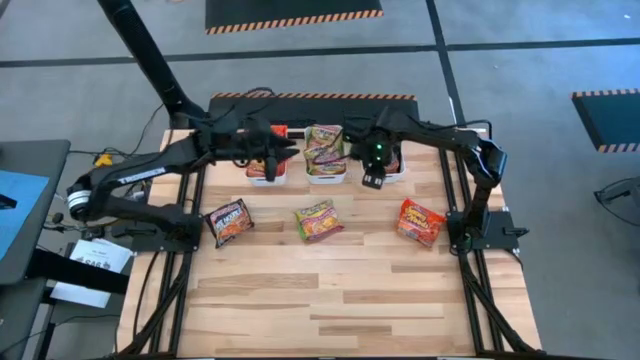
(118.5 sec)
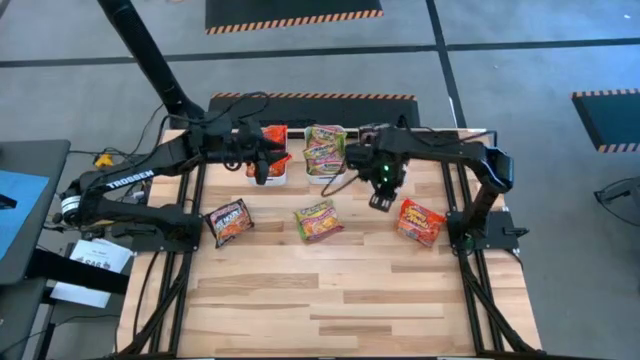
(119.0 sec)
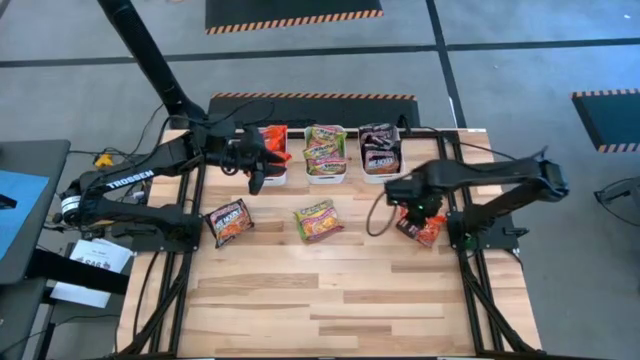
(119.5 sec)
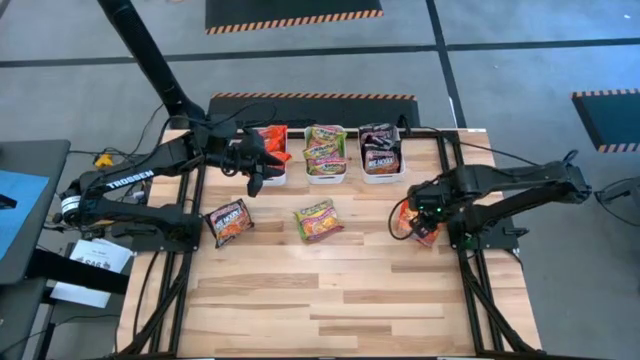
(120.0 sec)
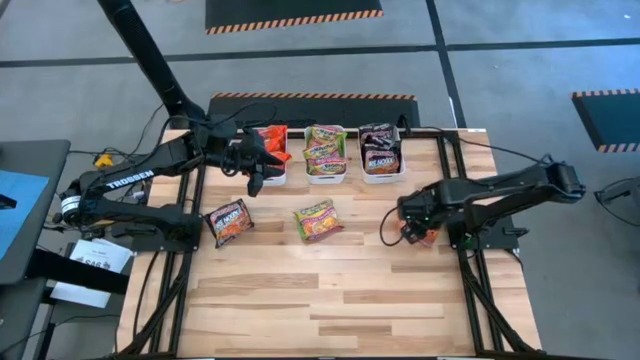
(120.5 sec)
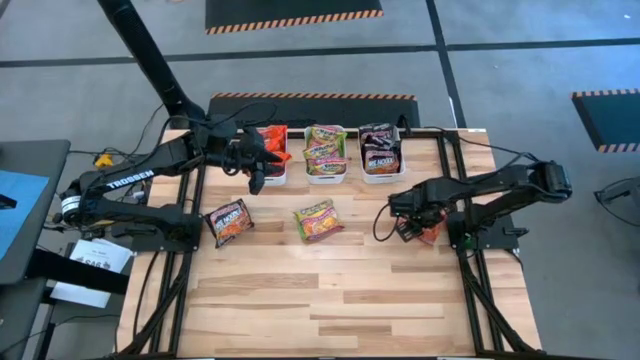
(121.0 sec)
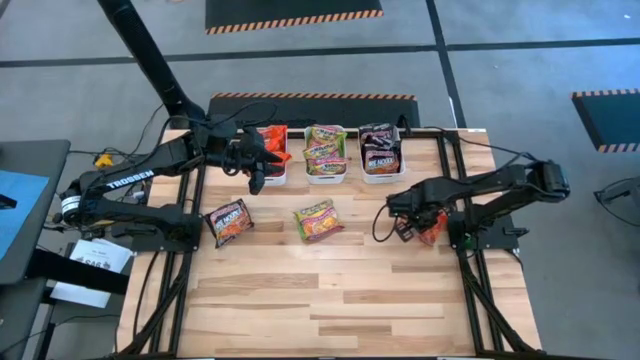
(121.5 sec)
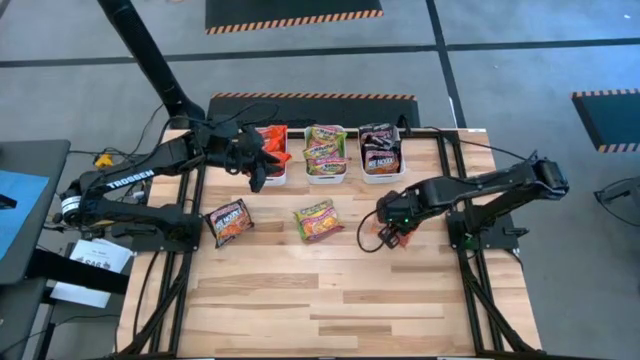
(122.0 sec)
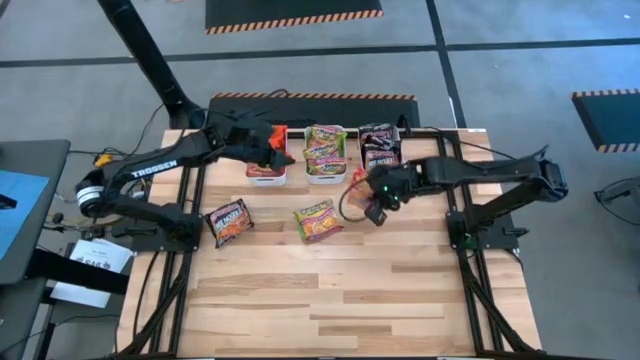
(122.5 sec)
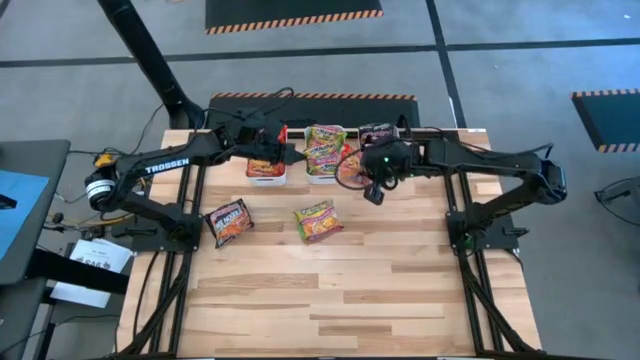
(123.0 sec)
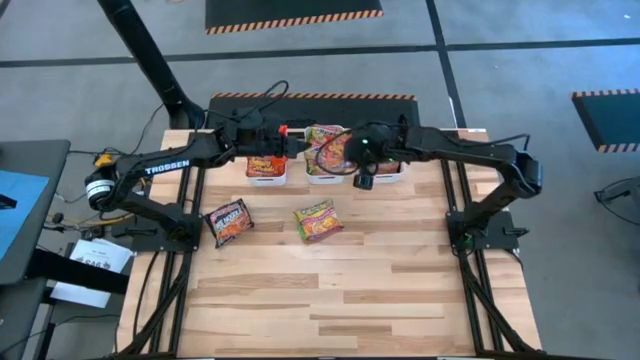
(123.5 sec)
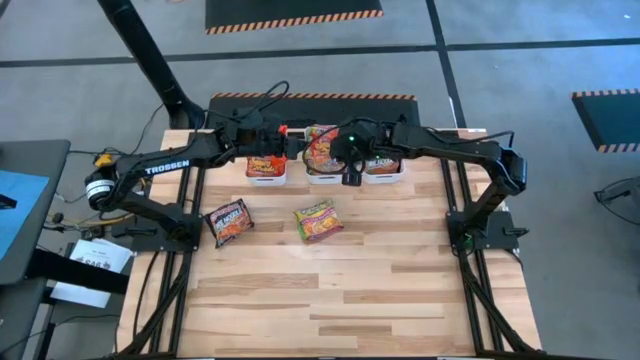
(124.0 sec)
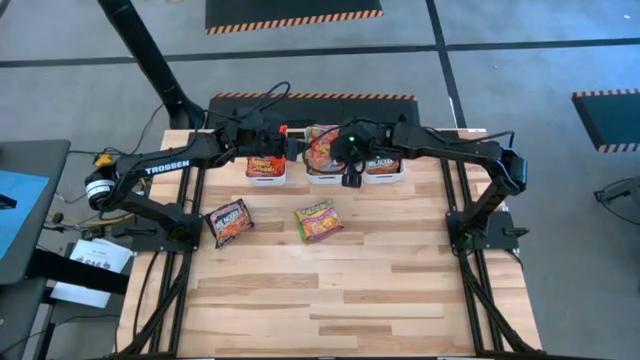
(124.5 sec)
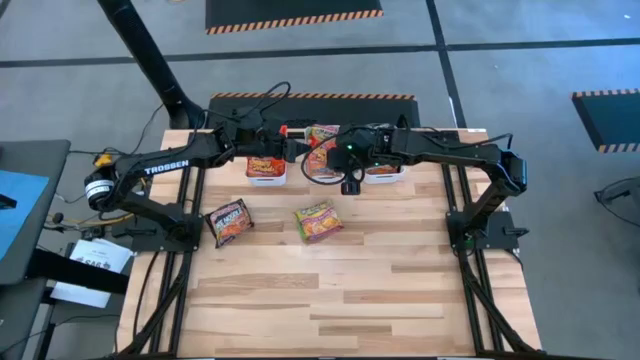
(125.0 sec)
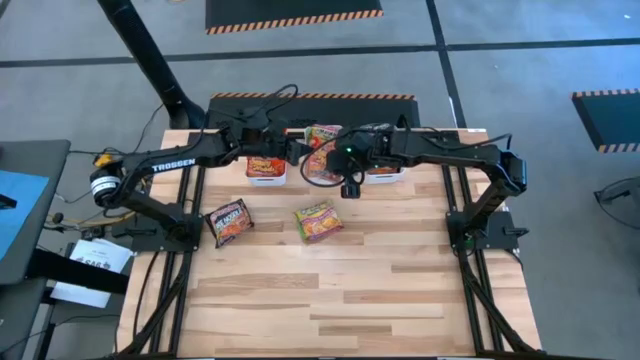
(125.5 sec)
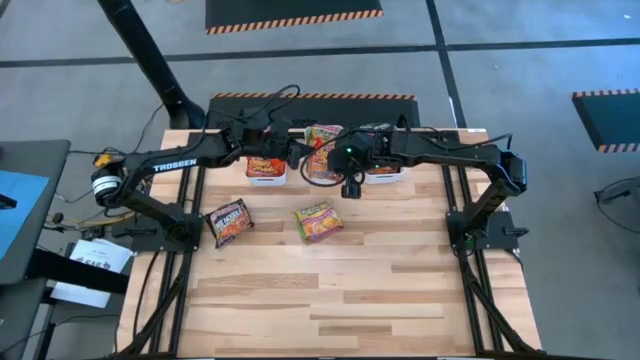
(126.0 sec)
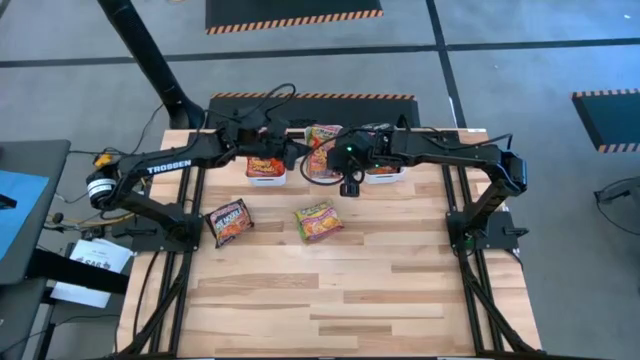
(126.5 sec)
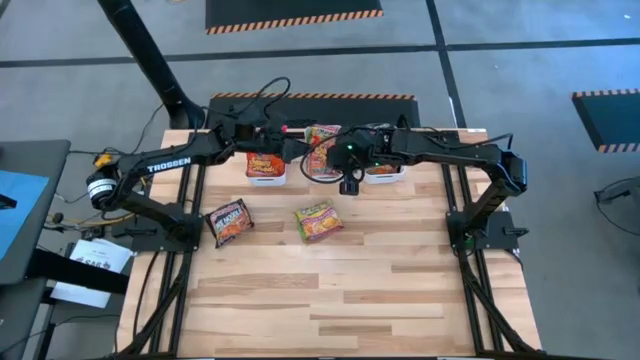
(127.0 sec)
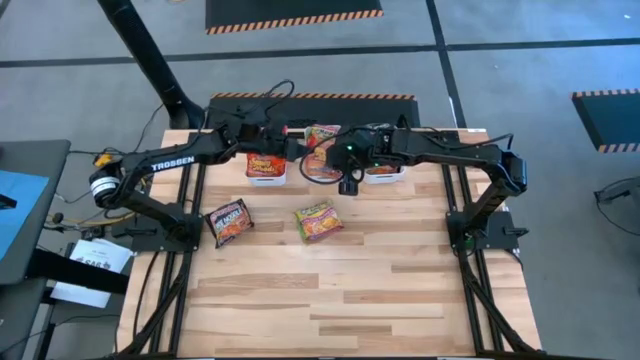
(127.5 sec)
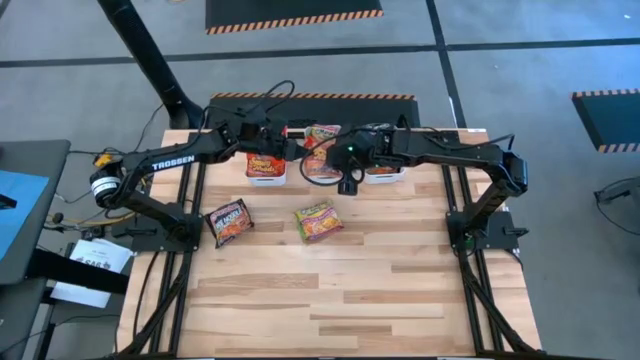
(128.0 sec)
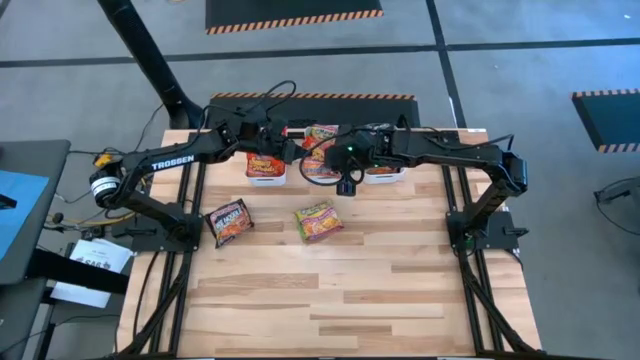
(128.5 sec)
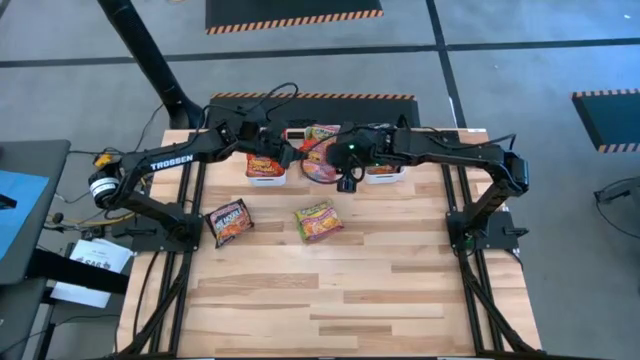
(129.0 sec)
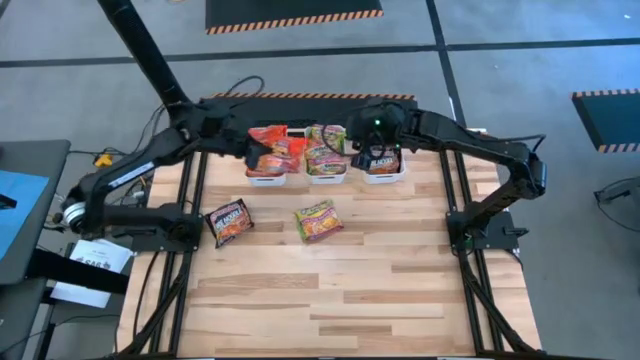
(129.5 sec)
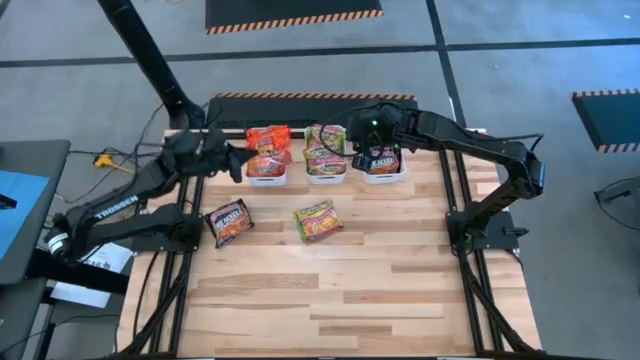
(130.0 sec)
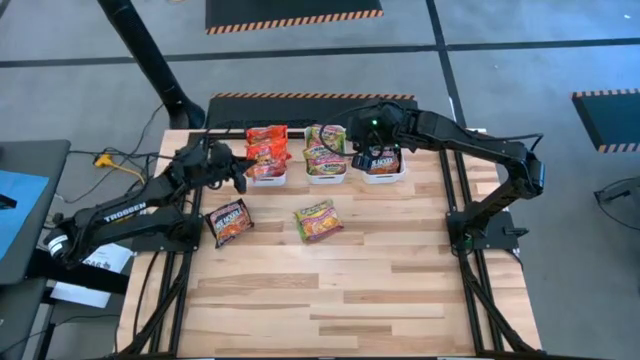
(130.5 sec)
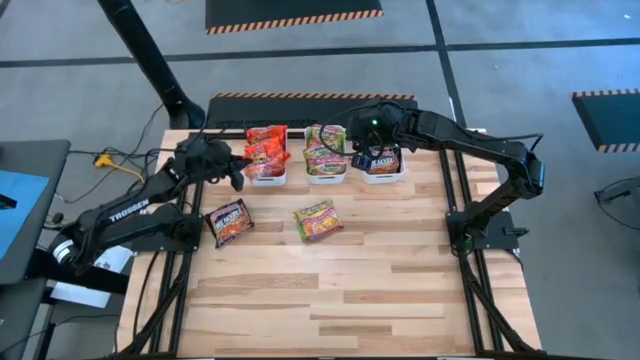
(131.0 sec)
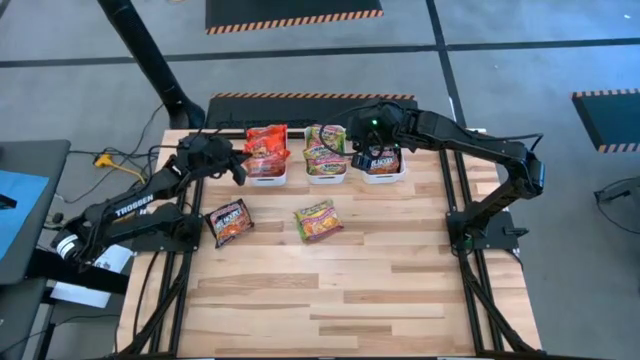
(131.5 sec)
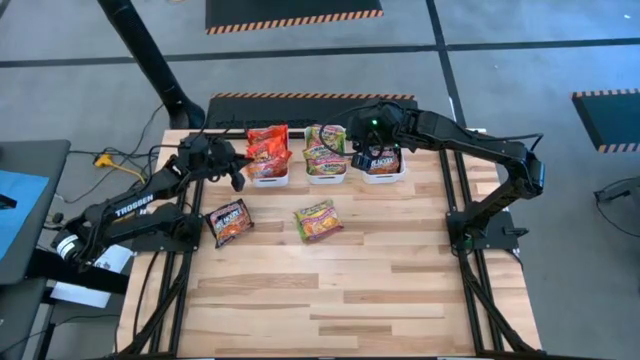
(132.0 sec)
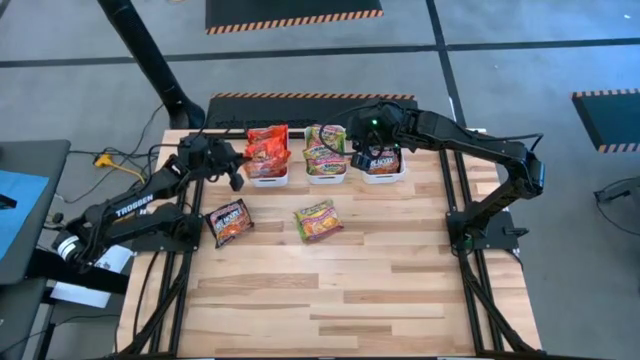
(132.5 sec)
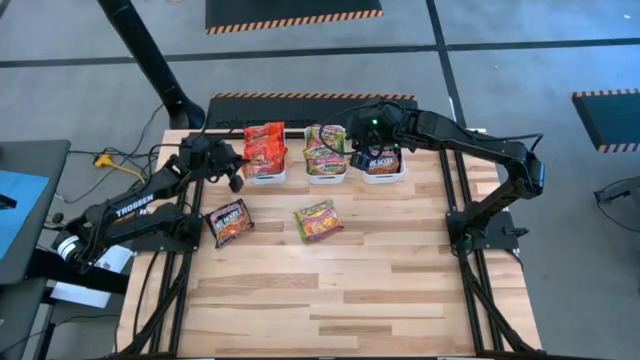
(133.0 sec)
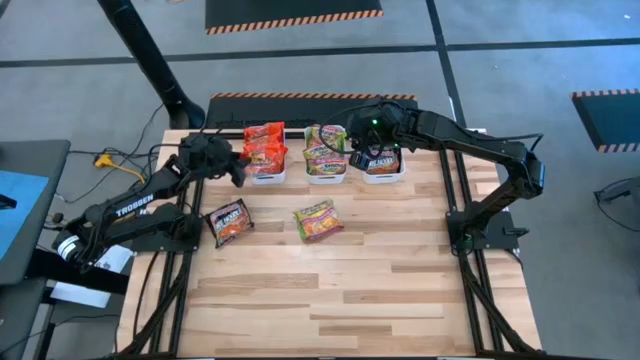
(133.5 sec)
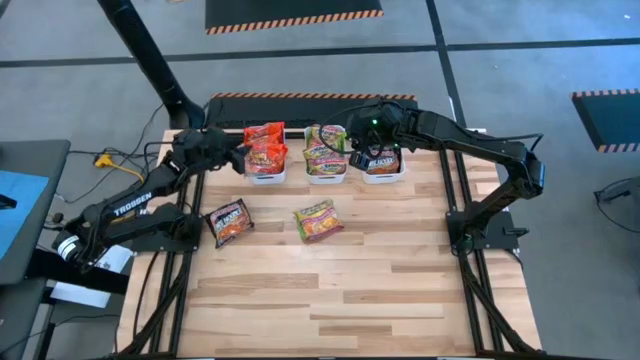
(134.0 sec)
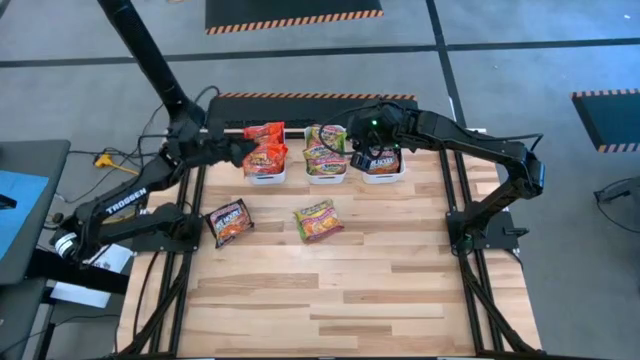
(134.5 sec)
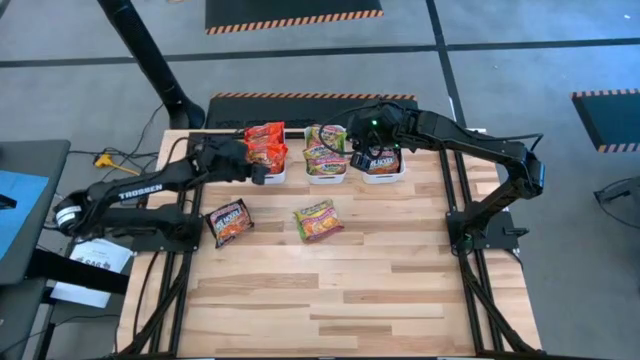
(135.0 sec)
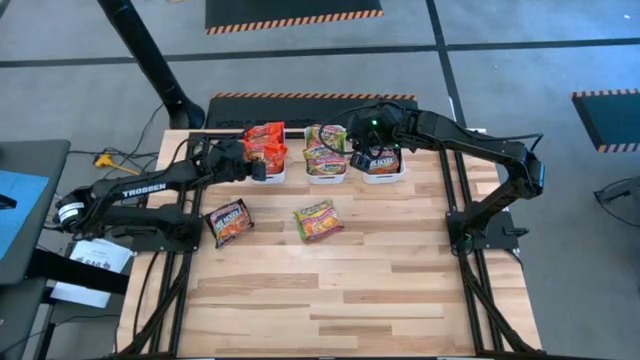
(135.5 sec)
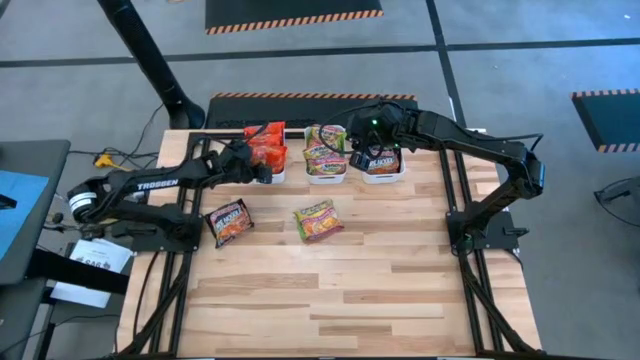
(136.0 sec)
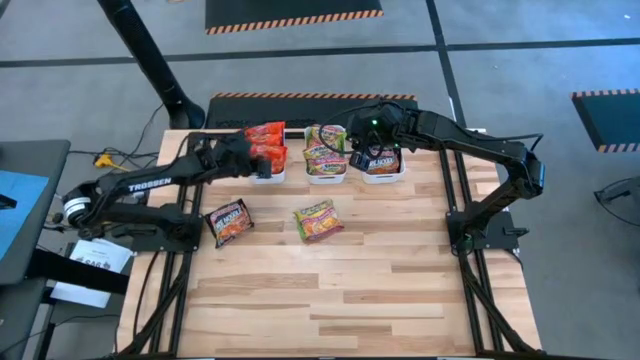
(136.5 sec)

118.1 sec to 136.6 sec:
Task: Sort Maruchan noodles
Put the orange noodle pack into the left white bin
